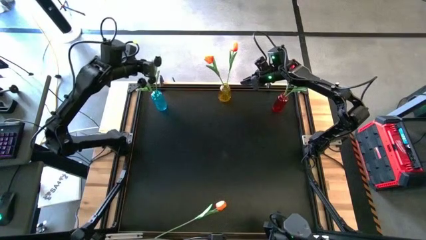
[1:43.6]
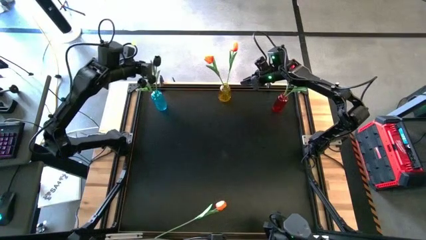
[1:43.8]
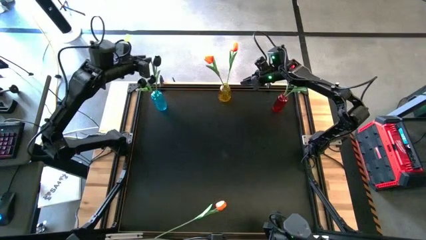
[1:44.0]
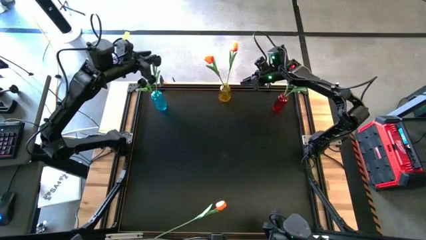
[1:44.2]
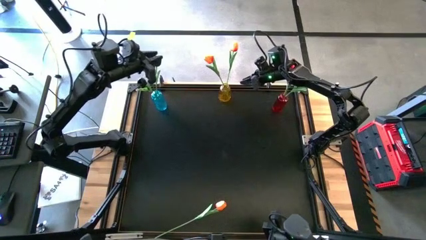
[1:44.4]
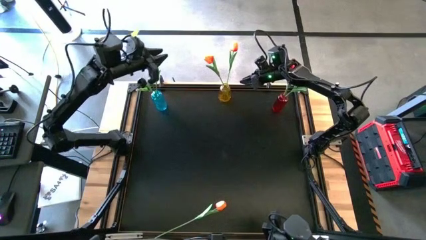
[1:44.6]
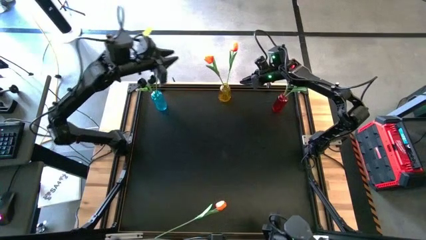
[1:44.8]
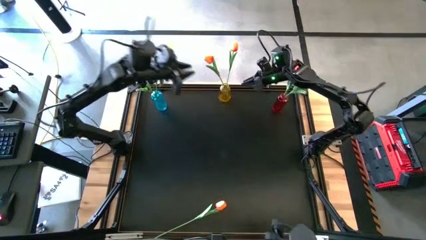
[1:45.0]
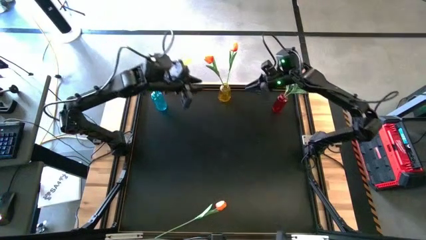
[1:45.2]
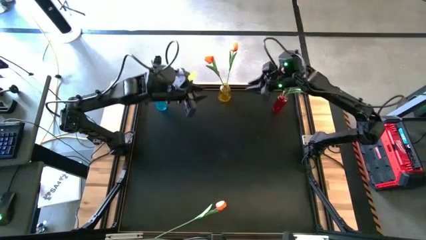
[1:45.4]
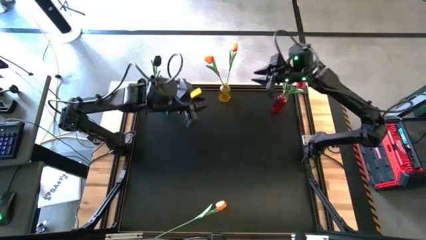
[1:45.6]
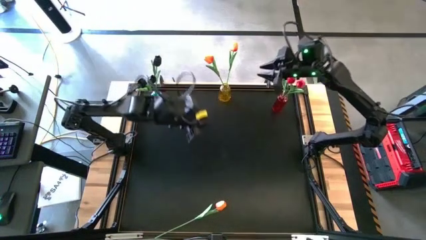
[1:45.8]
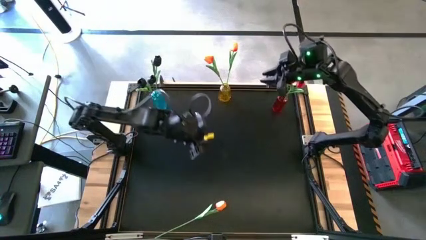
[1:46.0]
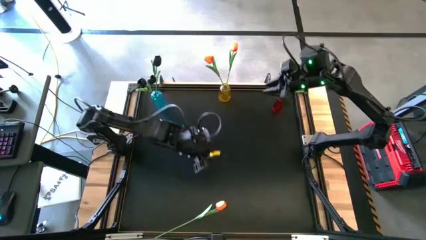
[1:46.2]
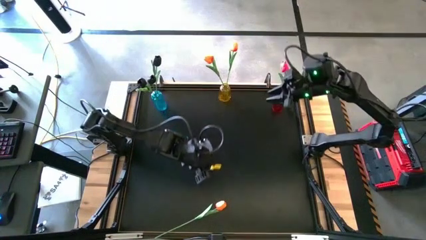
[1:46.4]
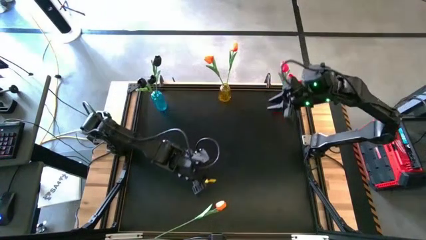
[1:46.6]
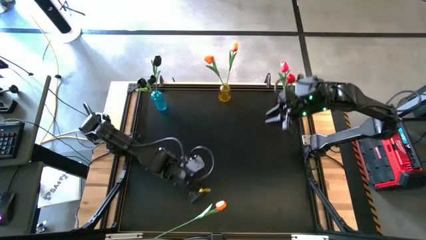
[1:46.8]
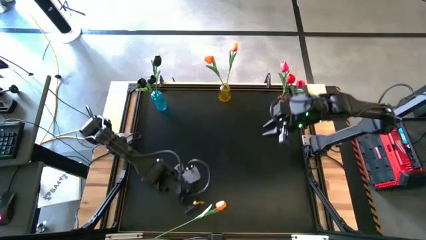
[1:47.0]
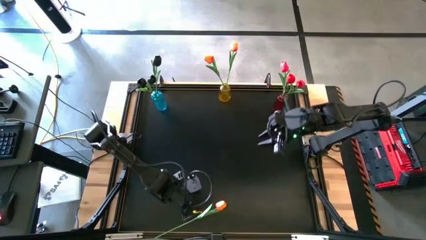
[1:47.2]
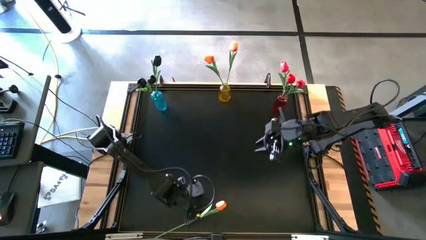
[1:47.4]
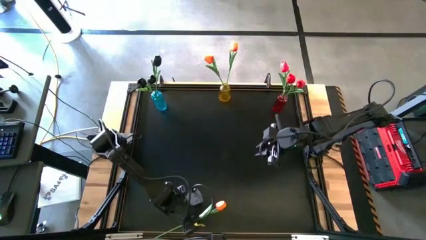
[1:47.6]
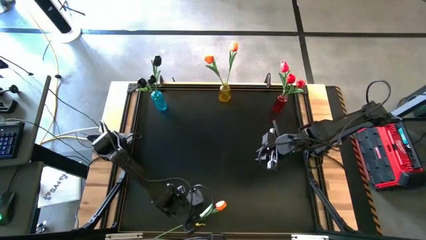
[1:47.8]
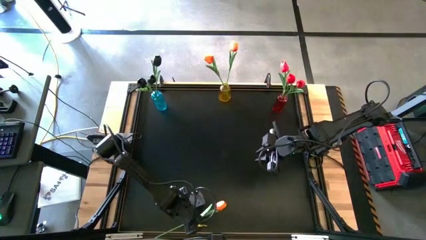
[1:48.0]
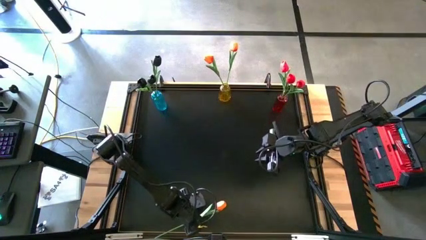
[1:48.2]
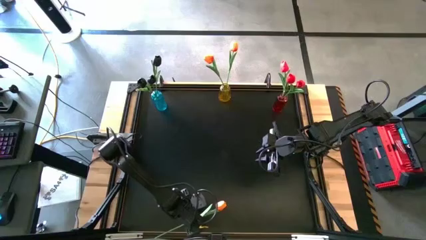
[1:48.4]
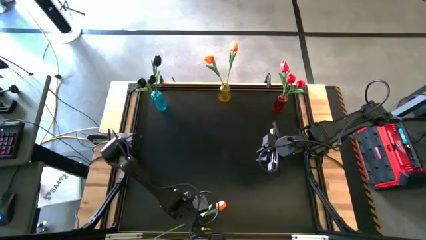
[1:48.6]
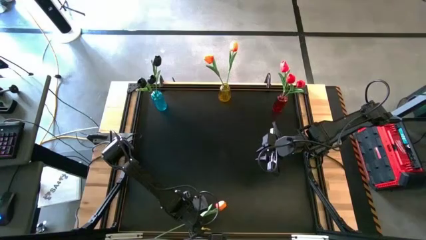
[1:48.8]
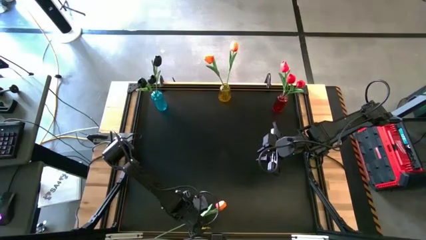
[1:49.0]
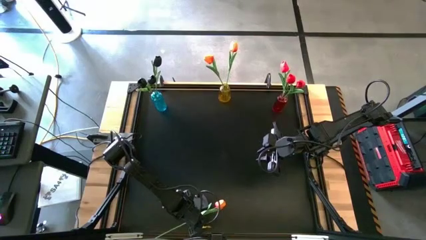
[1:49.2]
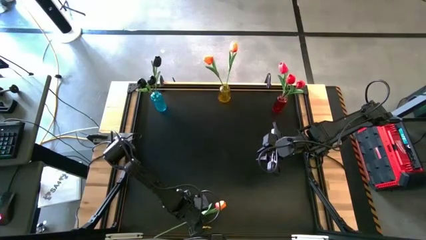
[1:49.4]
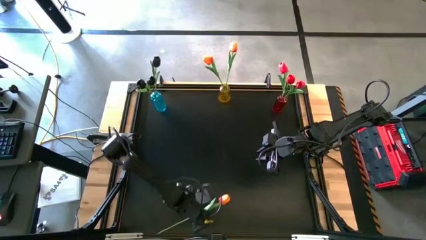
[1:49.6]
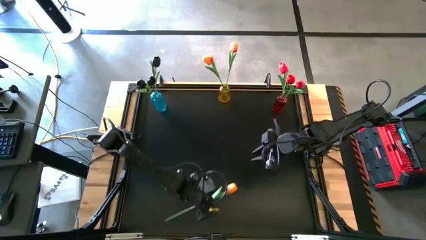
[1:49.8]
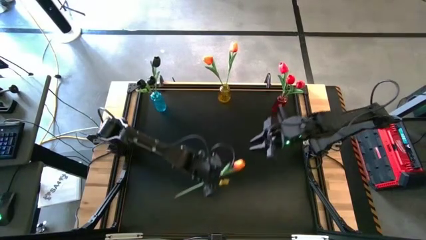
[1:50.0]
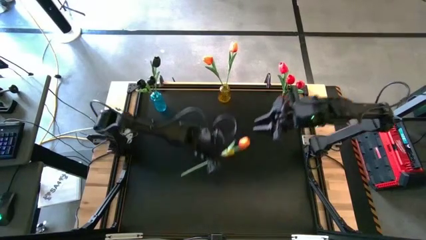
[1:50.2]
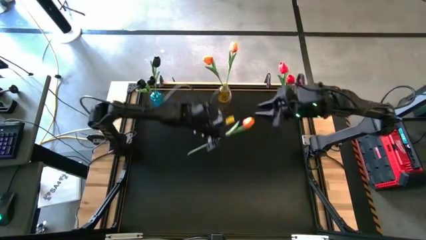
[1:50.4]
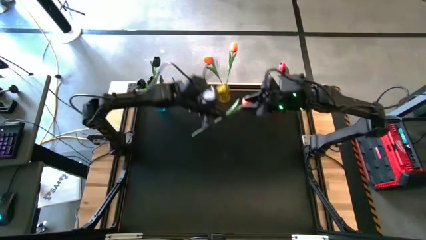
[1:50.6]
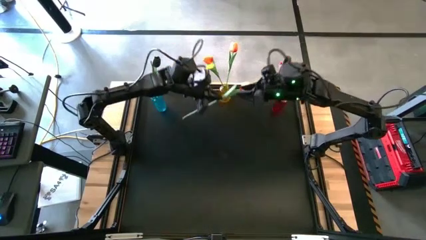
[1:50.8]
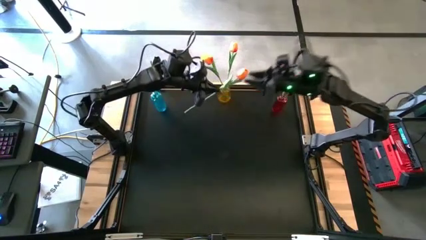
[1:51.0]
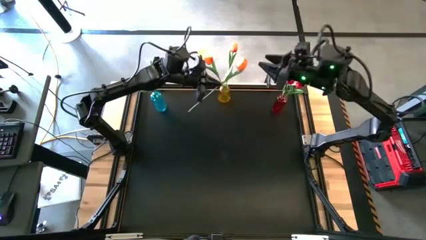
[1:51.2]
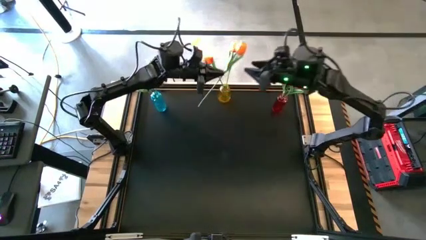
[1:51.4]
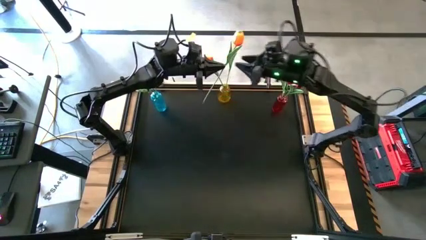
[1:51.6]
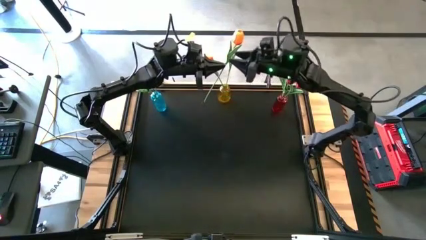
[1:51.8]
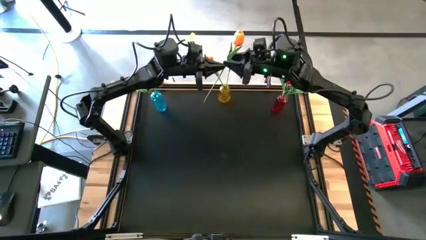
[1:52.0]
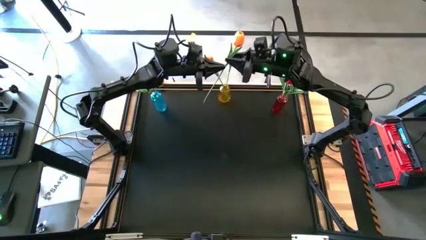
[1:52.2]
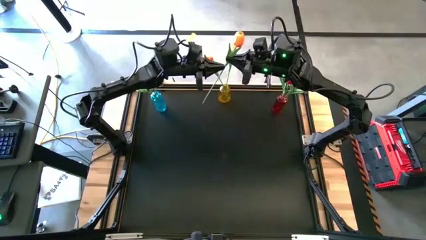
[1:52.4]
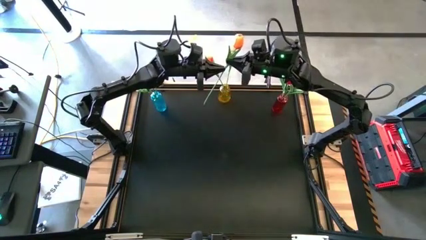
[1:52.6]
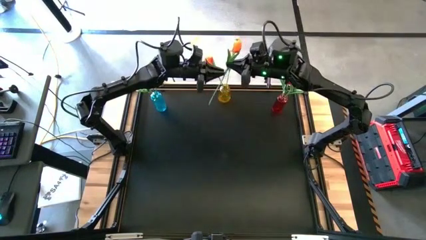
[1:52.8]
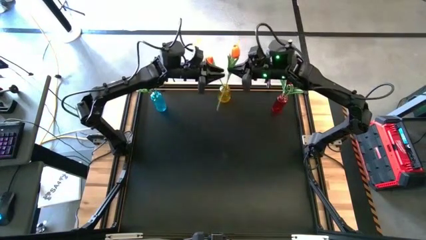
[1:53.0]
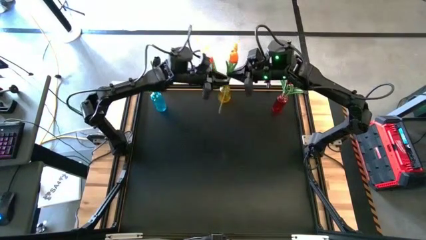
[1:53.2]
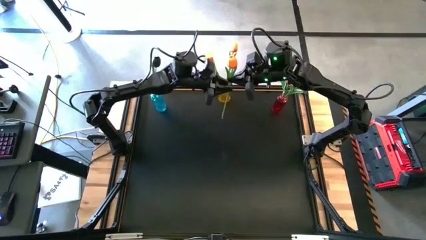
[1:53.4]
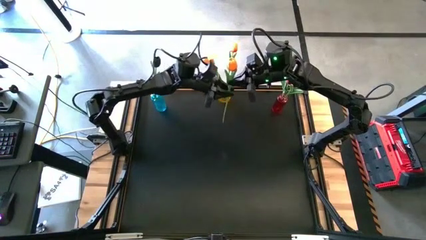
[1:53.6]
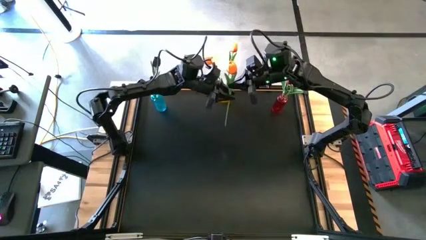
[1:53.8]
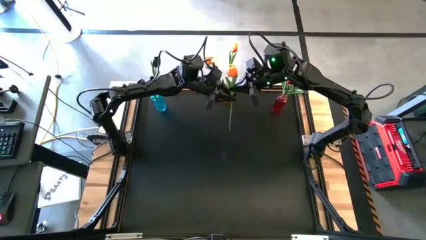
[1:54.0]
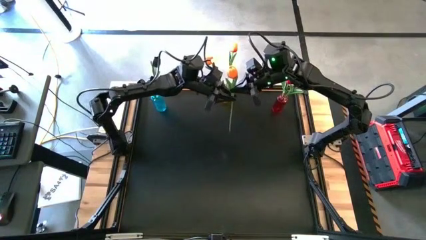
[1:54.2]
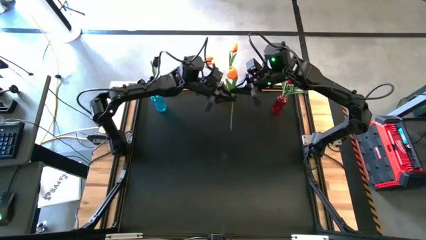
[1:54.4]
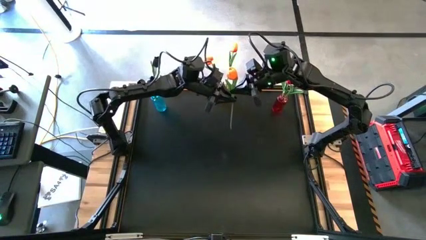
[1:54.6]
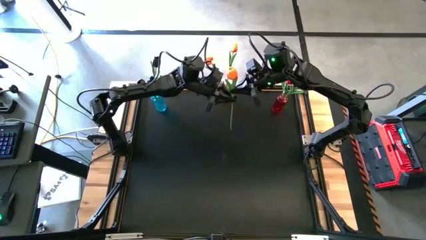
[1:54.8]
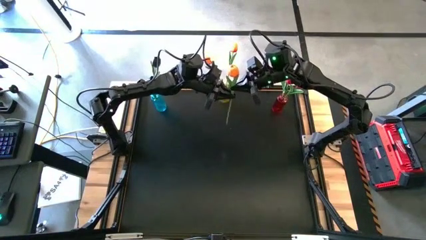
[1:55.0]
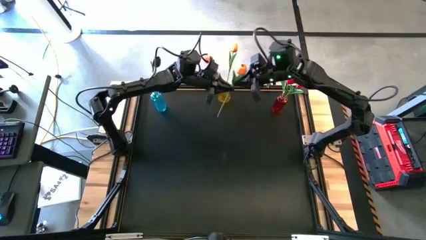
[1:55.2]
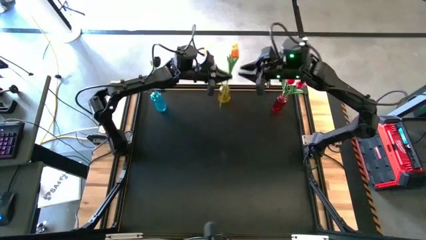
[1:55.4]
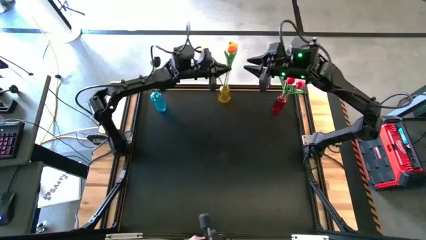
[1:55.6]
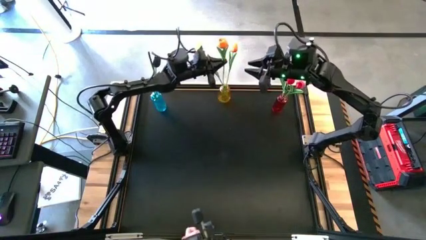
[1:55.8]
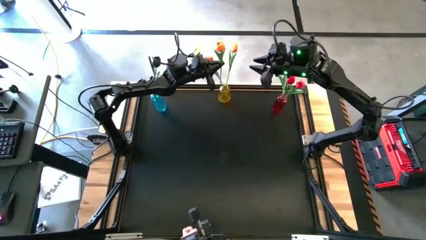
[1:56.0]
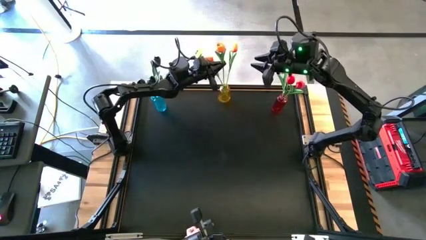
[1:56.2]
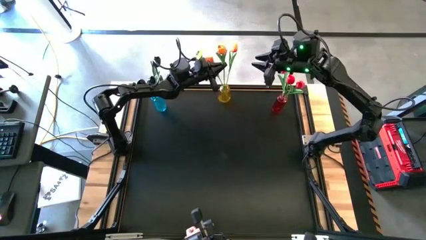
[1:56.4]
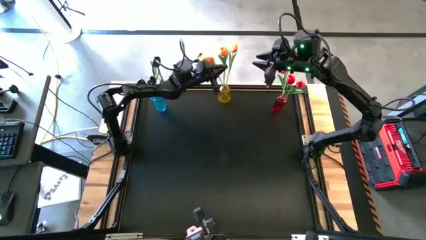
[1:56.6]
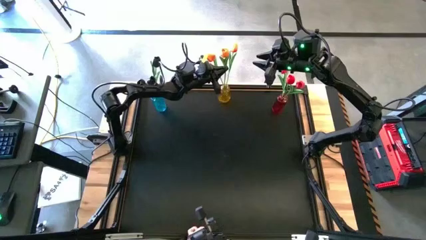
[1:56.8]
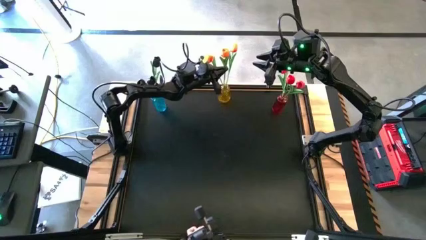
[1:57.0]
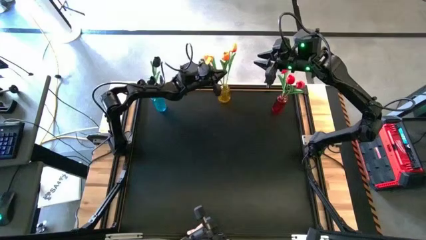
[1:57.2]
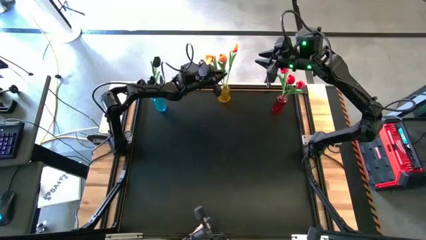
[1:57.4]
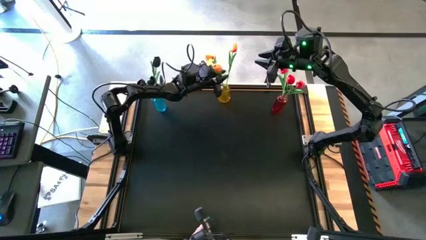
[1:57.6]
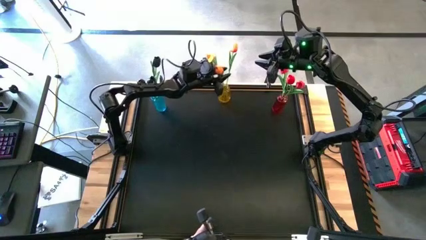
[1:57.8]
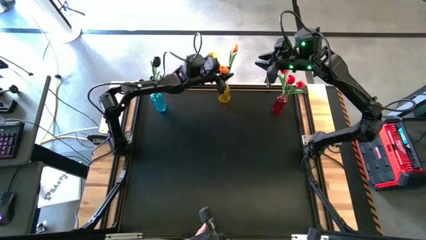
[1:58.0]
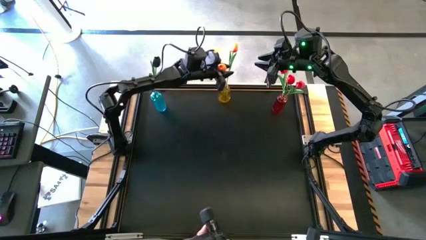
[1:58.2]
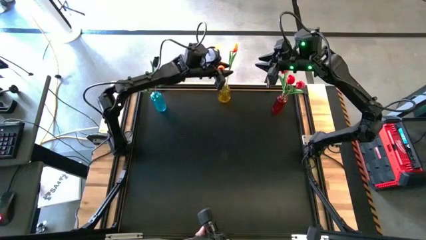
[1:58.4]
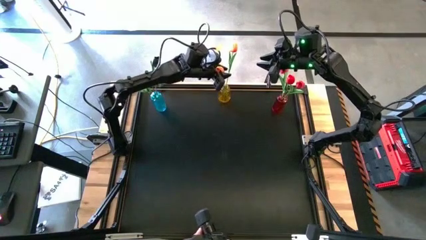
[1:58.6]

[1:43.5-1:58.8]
Task: Sort flowers into vase by color
Put the orange flower into the yellow vase
